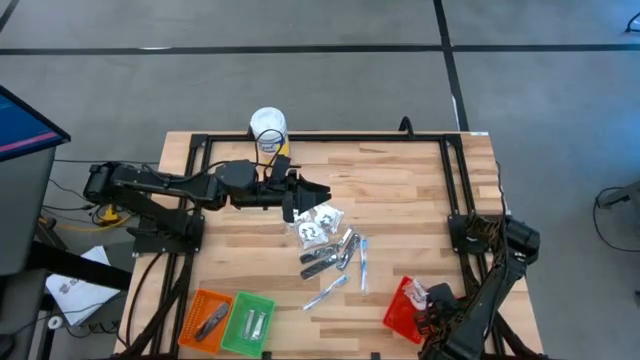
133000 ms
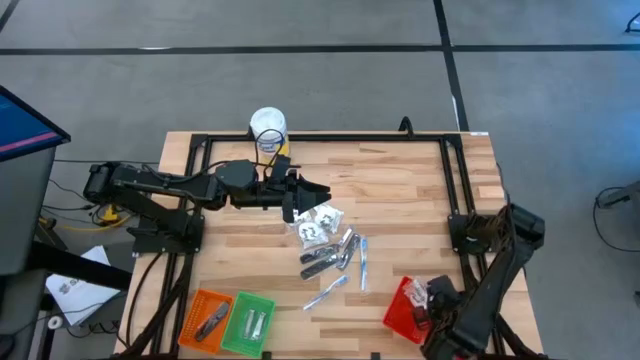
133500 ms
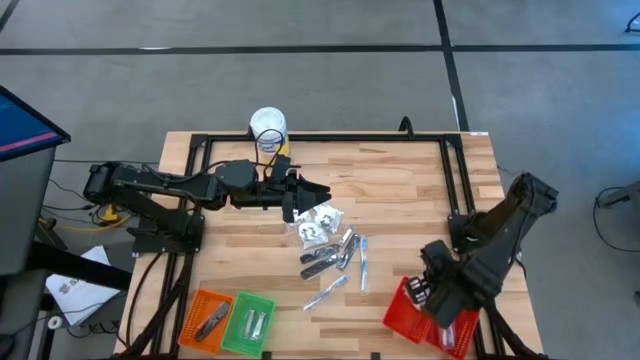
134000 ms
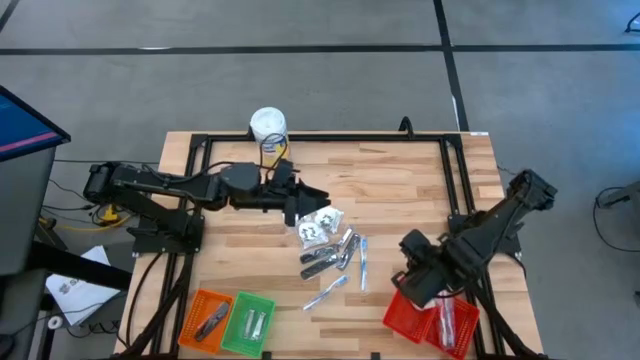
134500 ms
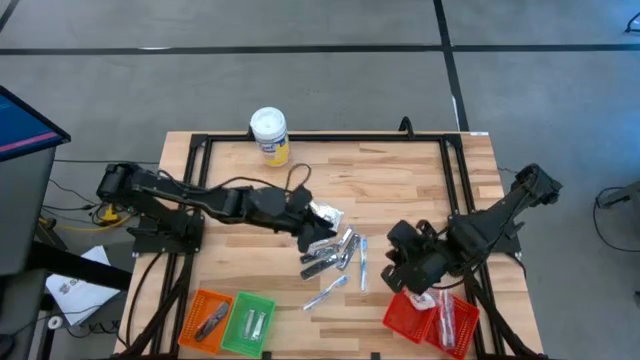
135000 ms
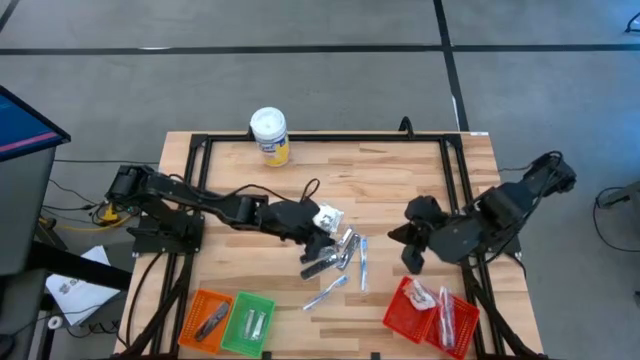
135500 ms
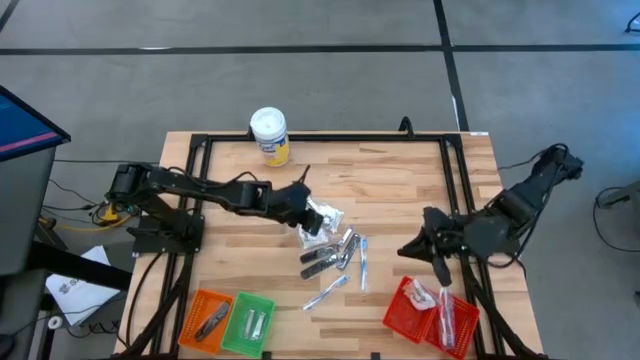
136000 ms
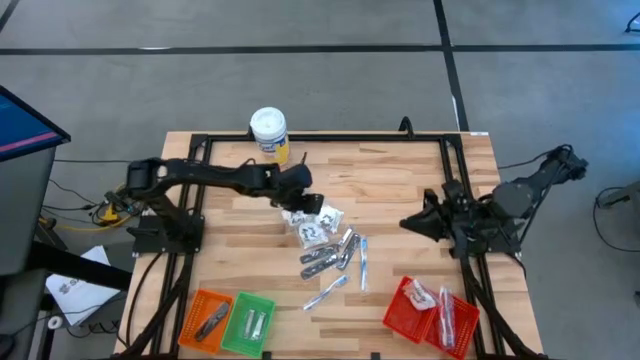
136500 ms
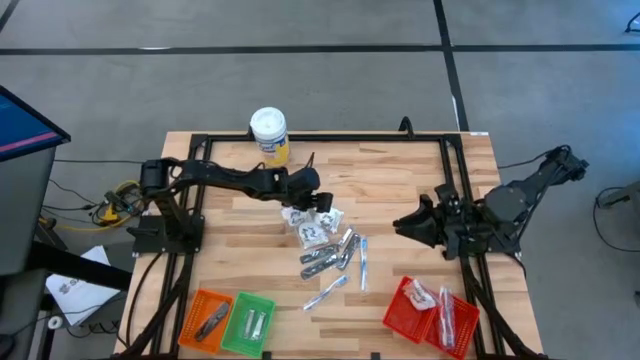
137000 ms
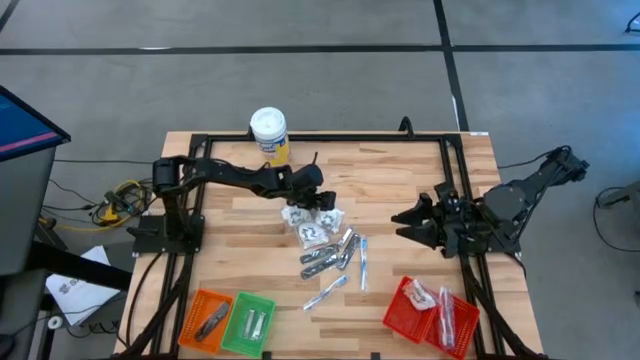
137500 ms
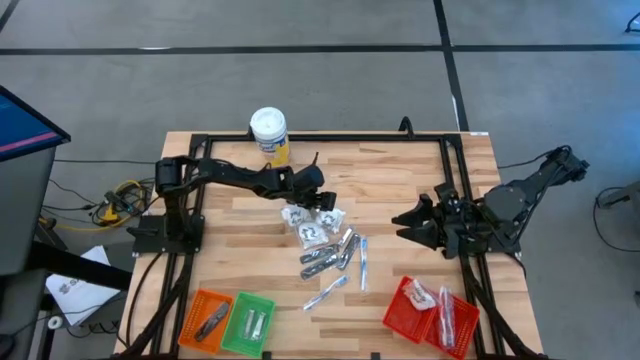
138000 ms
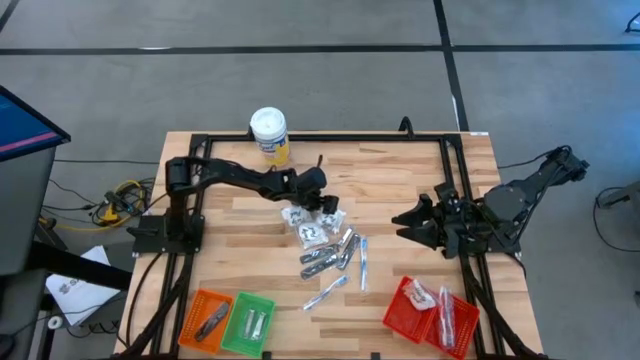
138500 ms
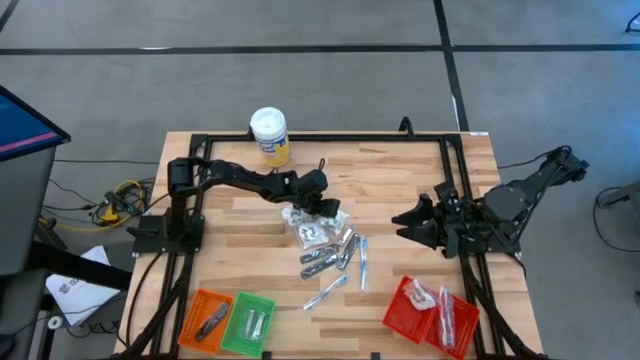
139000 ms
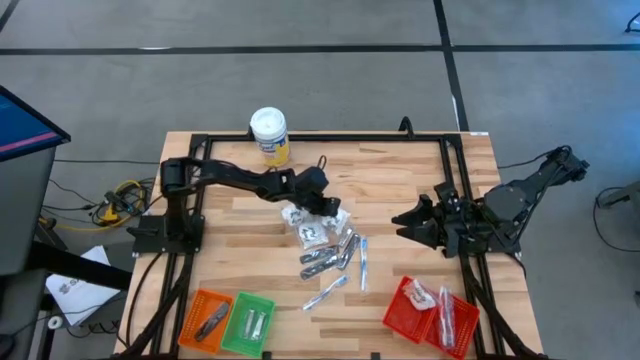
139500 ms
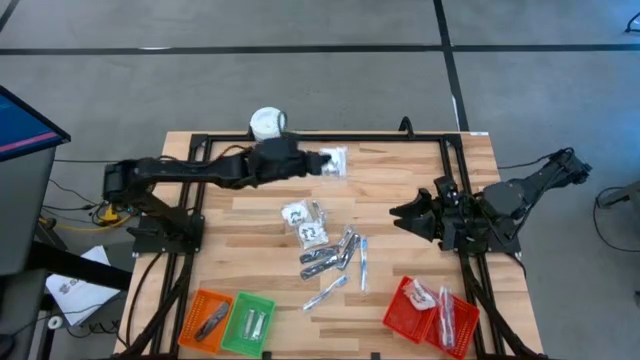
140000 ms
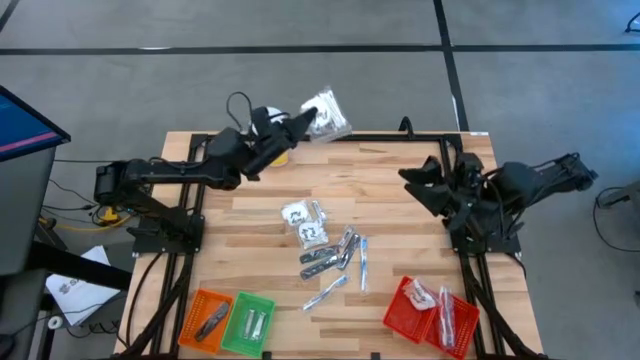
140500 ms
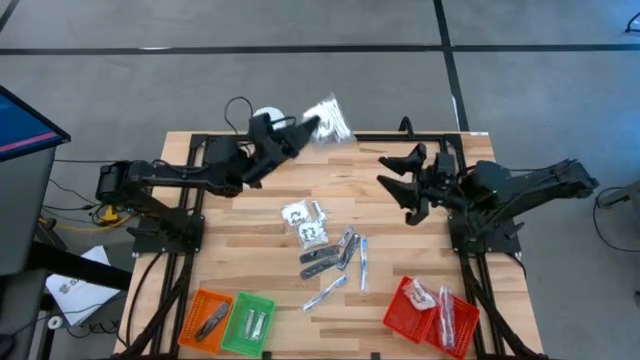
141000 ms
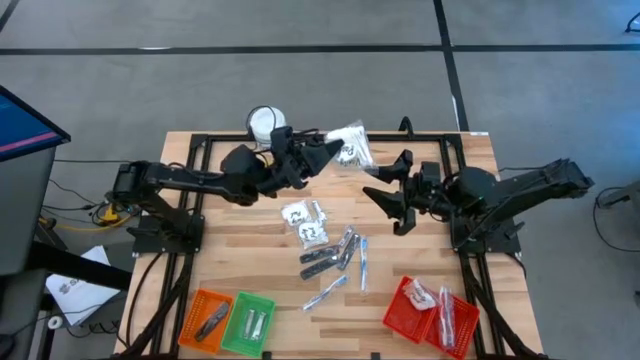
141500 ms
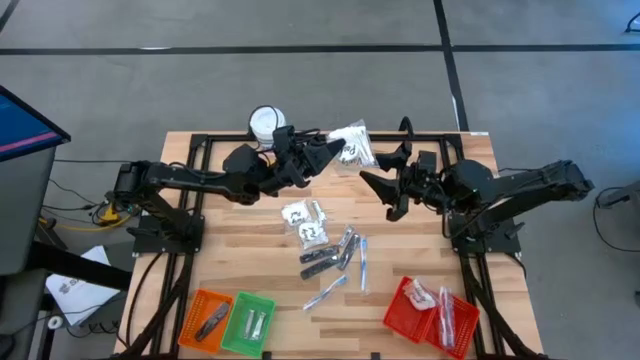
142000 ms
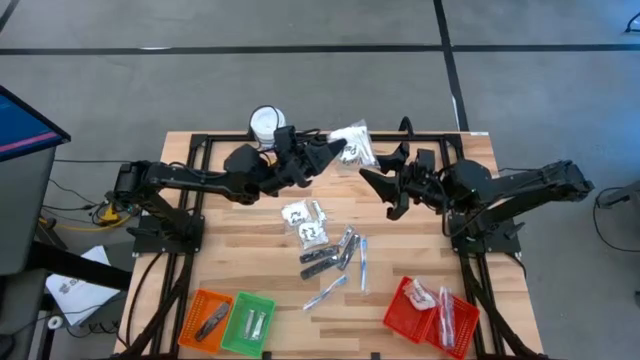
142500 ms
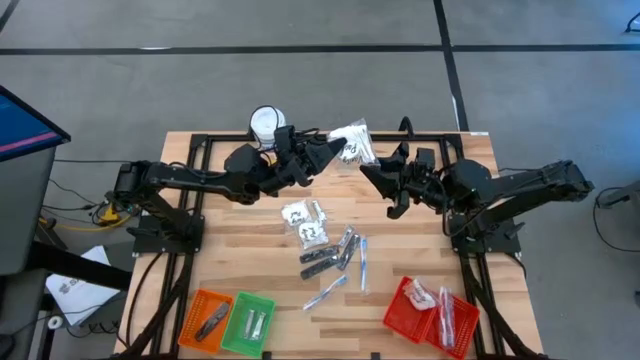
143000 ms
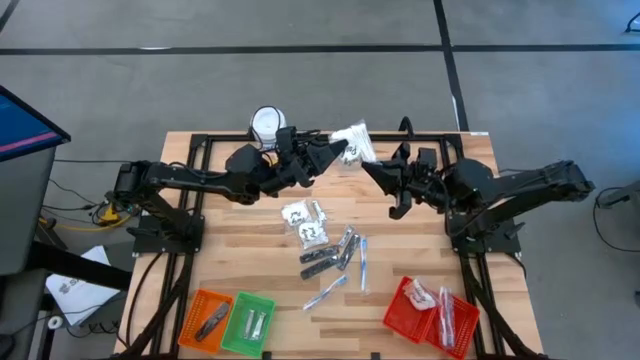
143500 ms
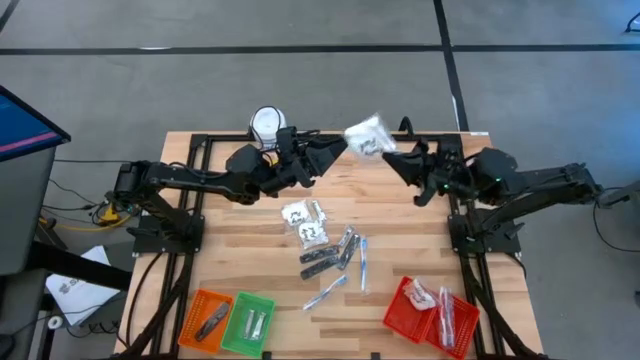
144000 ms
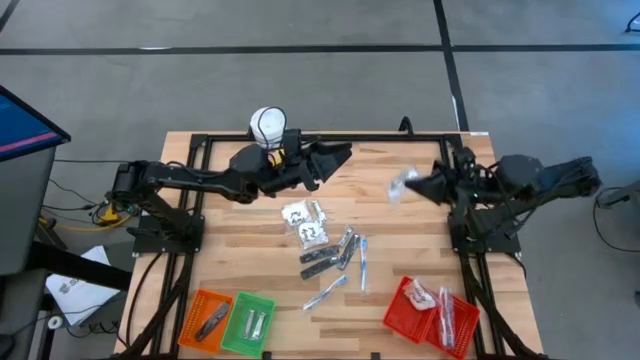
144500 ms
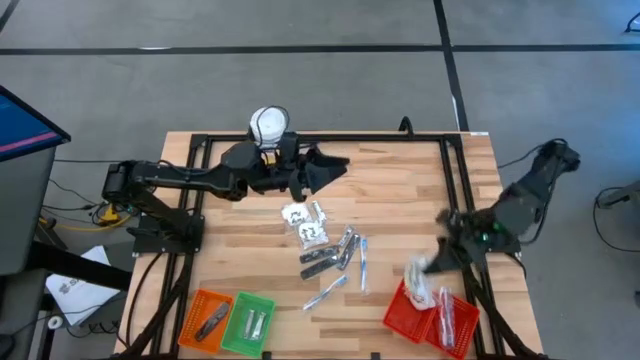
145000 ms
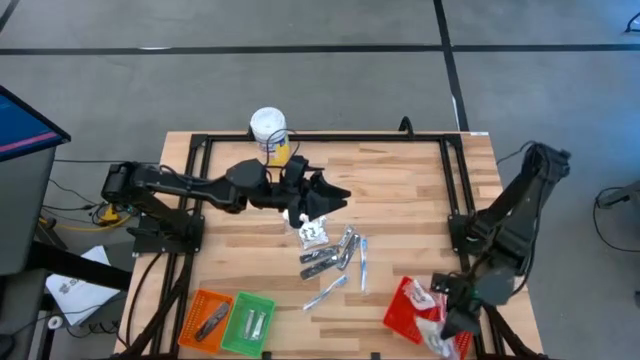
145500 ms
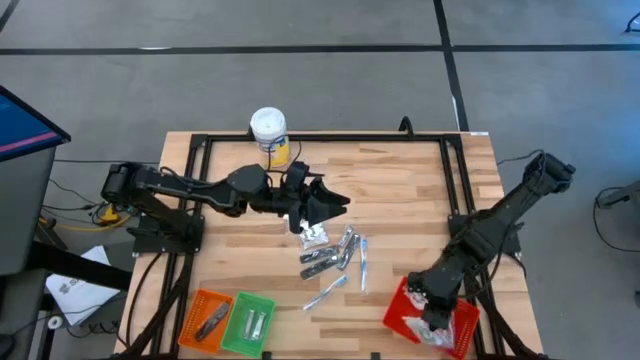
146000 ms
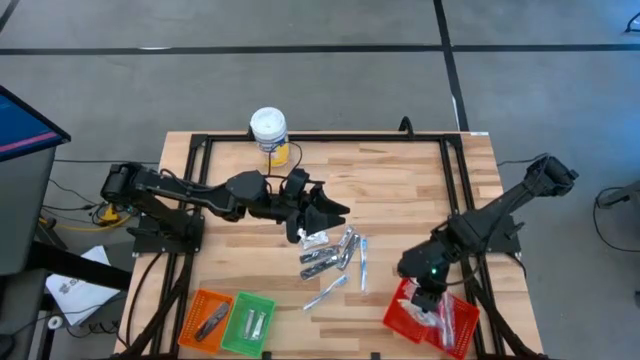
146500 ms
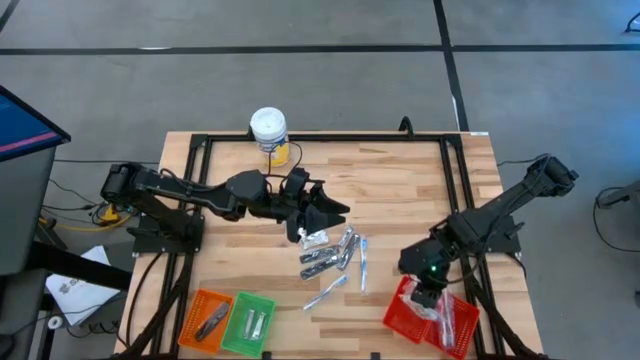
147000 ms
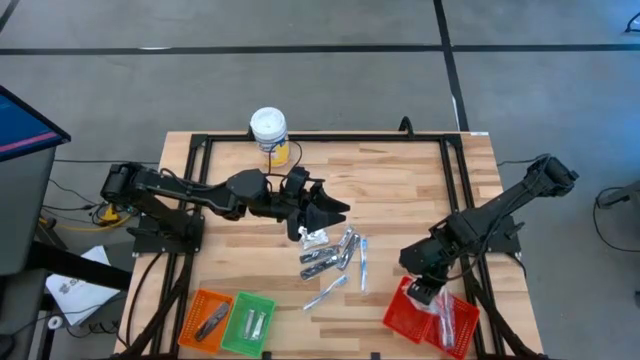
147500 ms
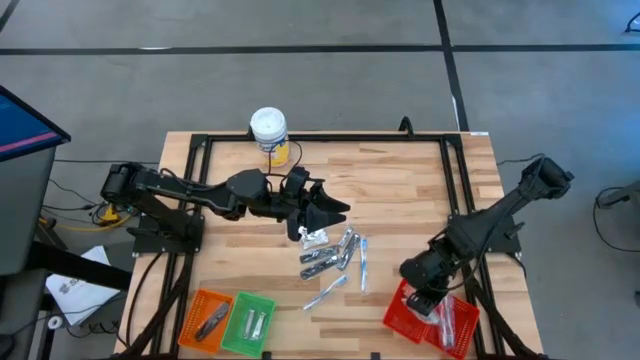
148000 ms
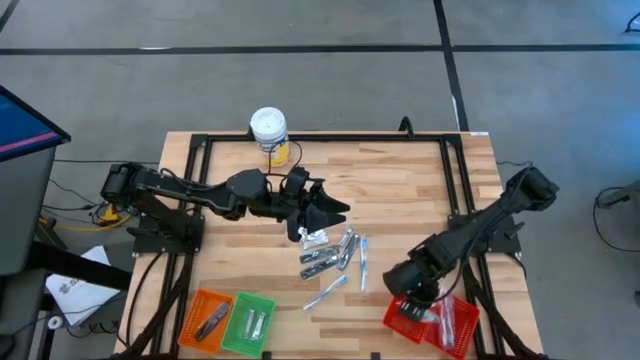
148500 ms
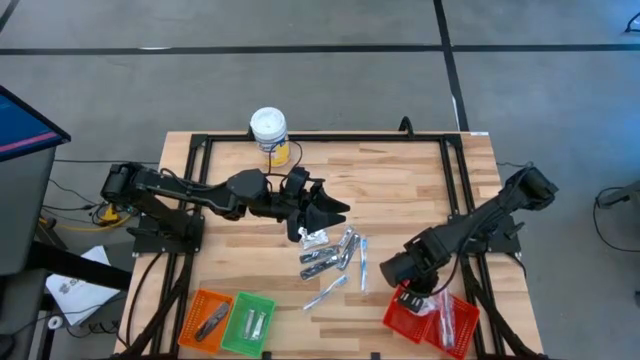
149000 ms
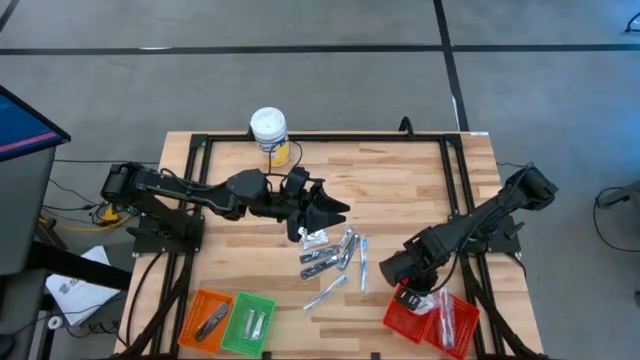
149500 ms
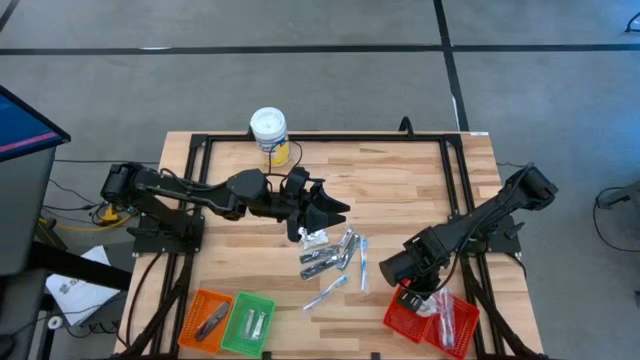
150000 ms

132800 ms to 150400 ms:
Task: Pick & Place Travel size toiletries
Put the cotton pods into the left red basket

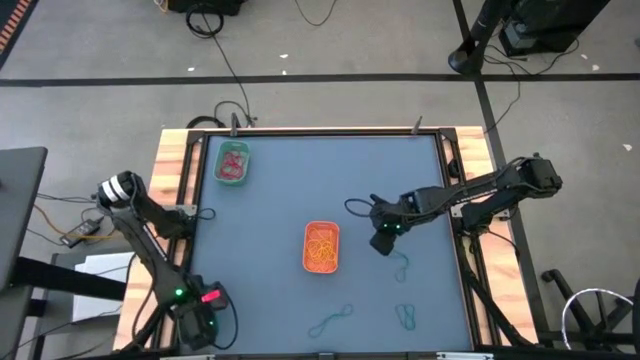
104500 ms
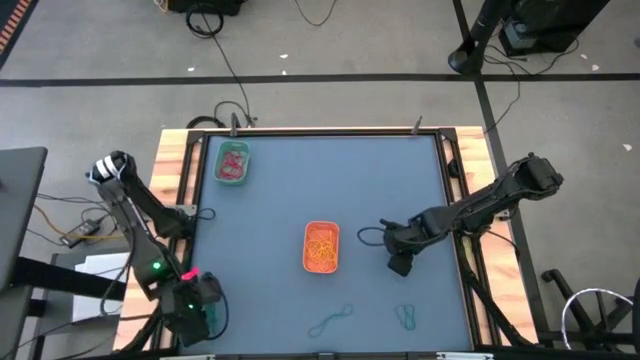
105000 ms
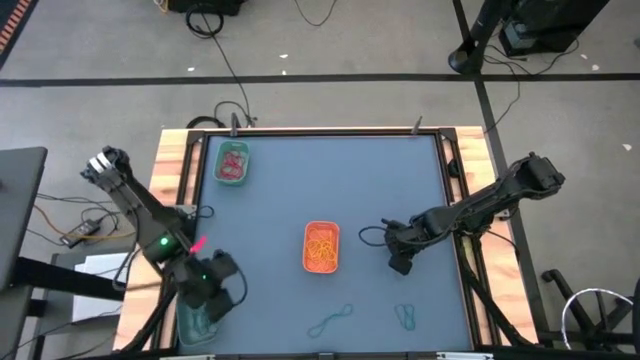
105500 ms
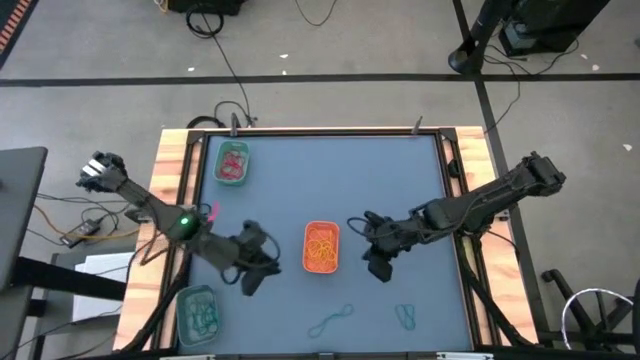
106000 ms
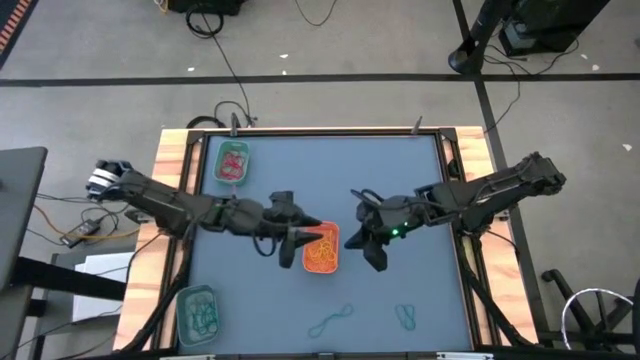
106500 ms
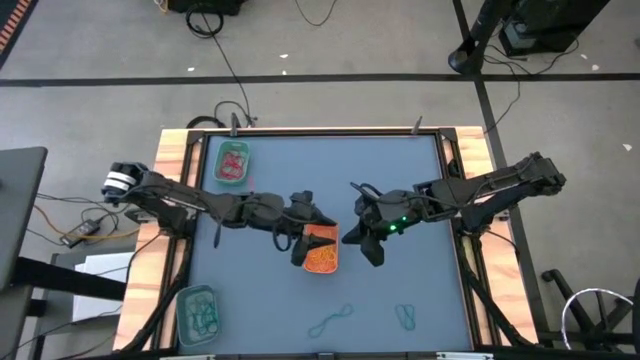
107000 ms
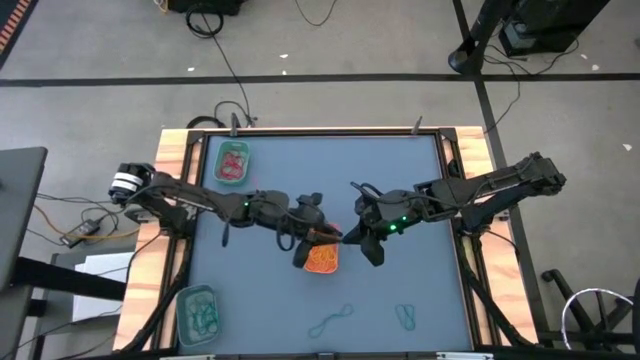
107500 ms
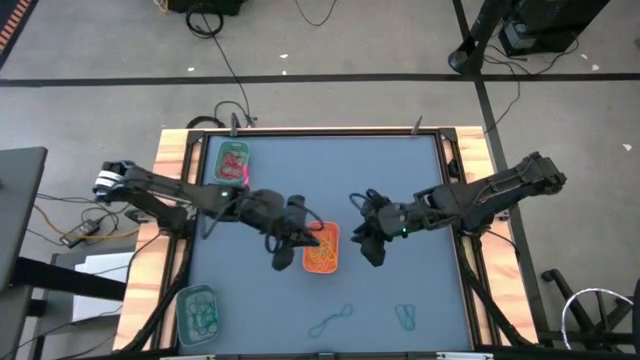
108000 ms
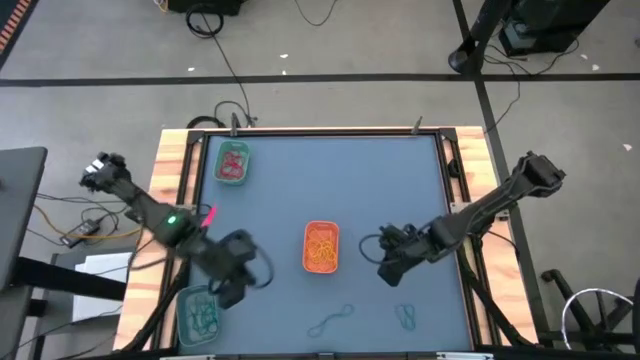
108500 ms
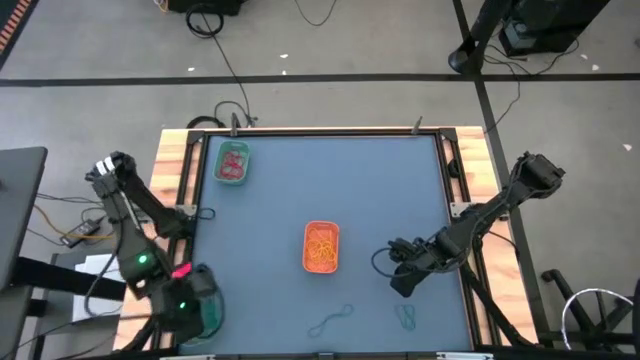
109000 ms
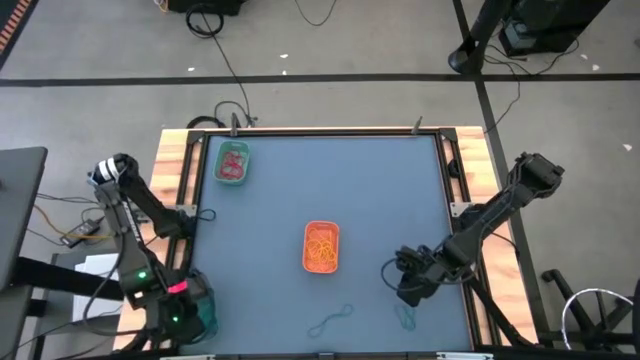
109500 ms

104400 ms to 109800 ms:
Task: Sort rubber bands into baskets
Put the blue rubber band into the blue bin
